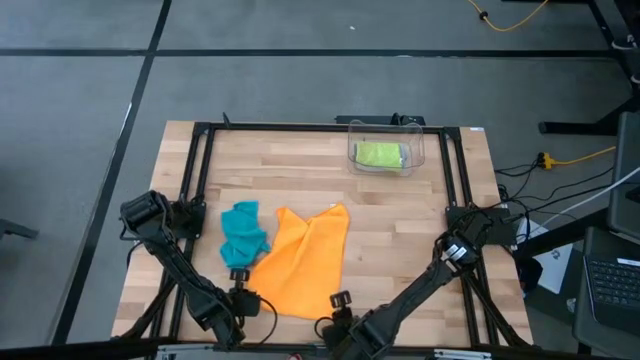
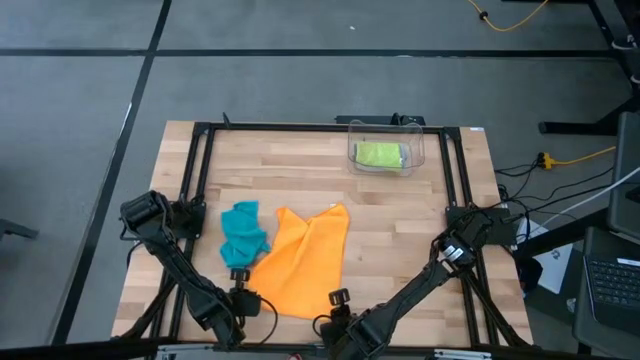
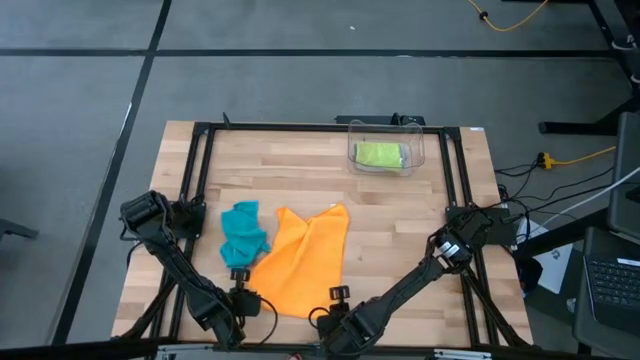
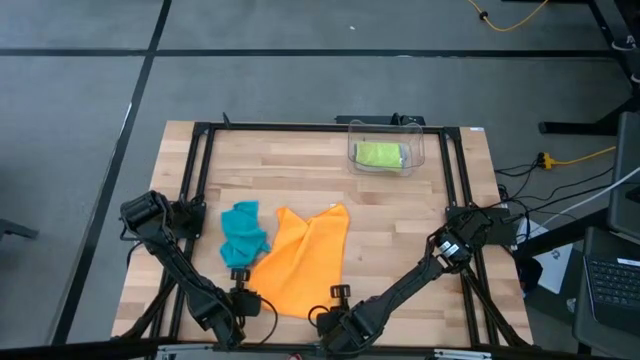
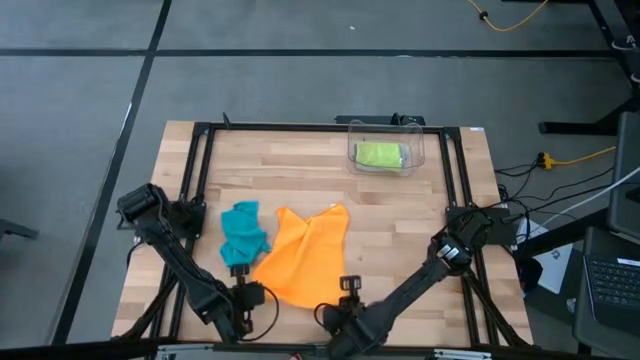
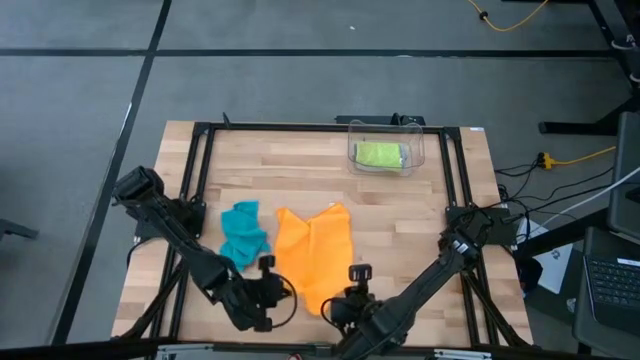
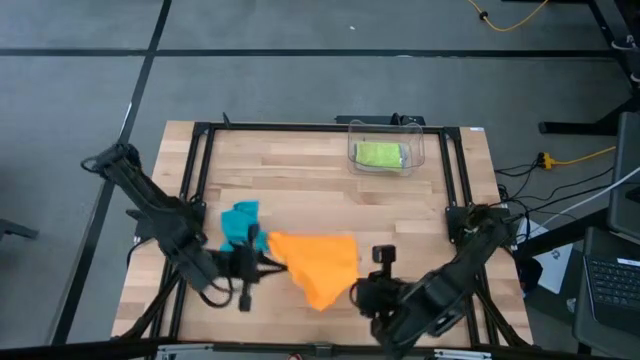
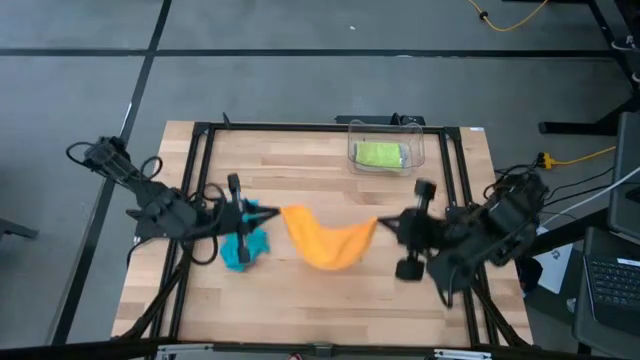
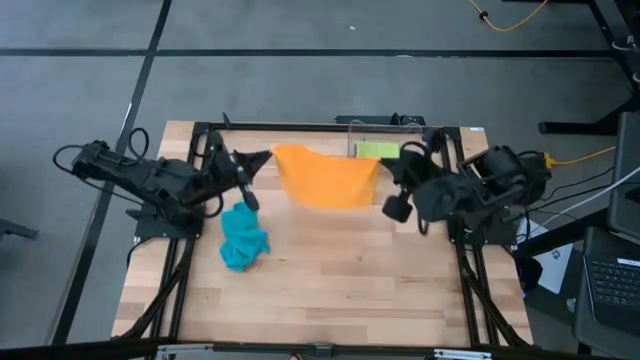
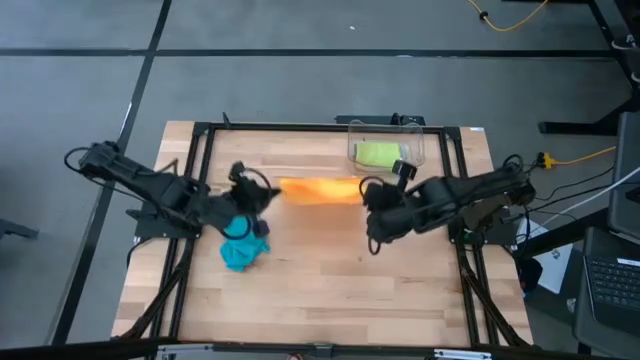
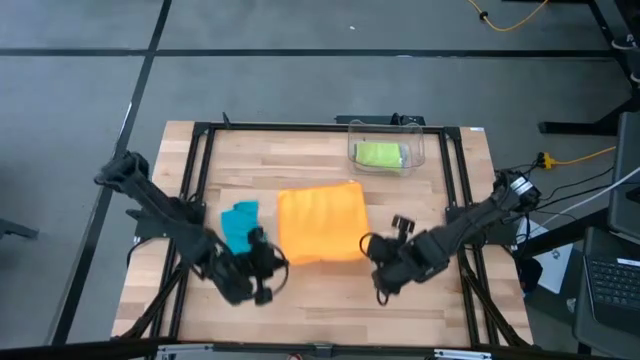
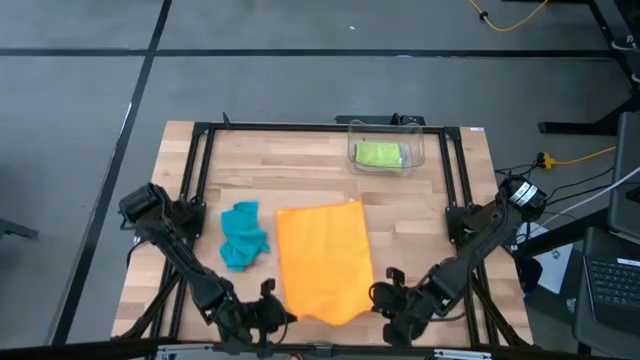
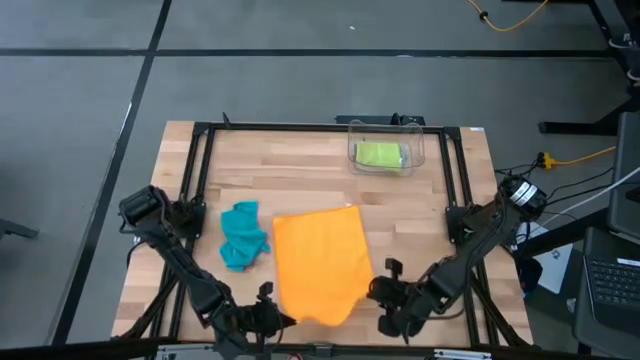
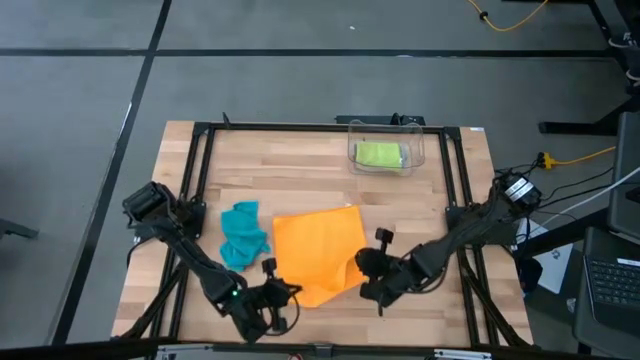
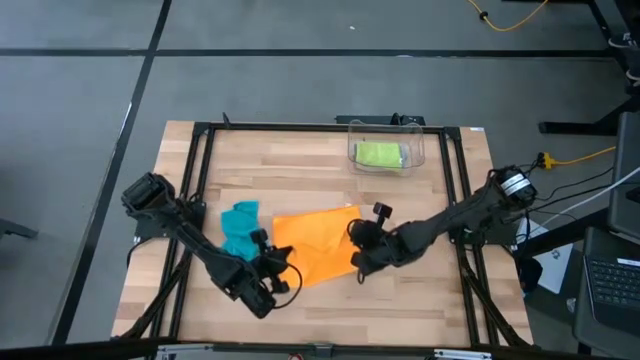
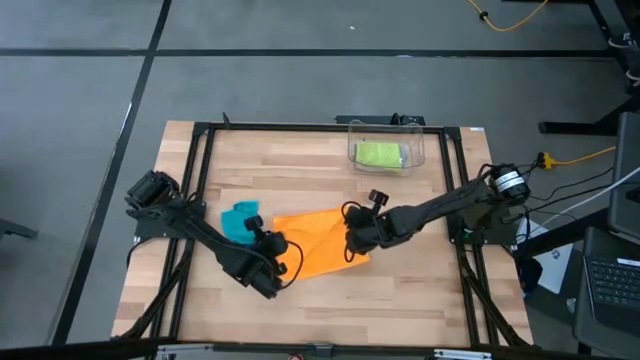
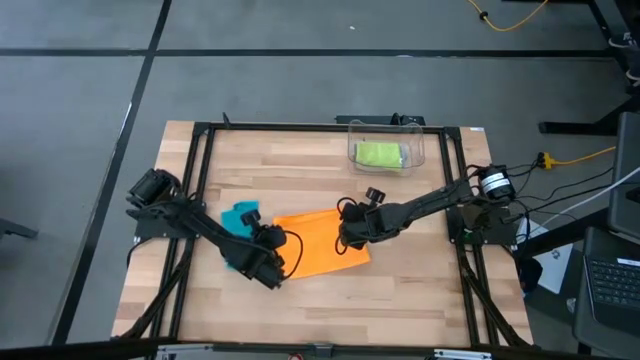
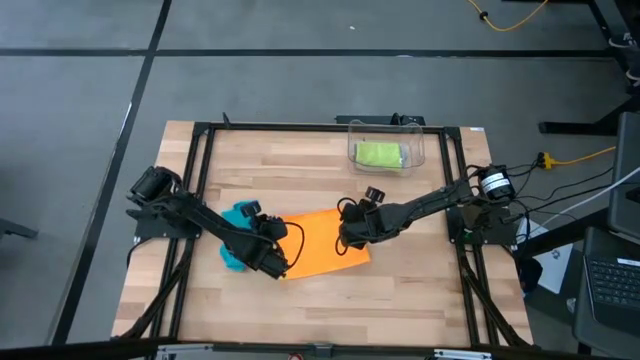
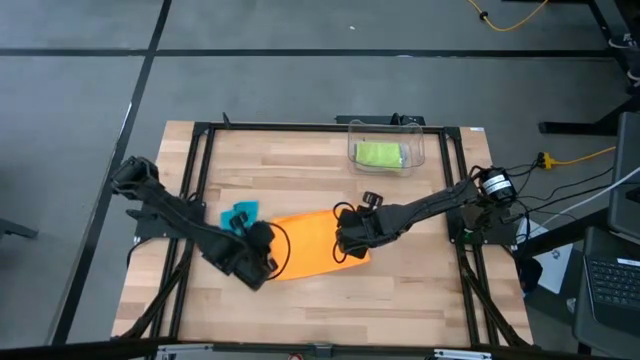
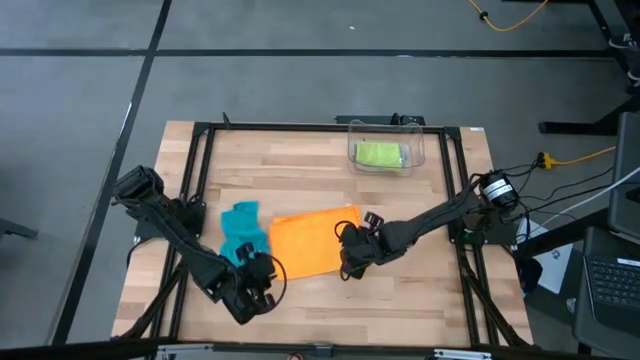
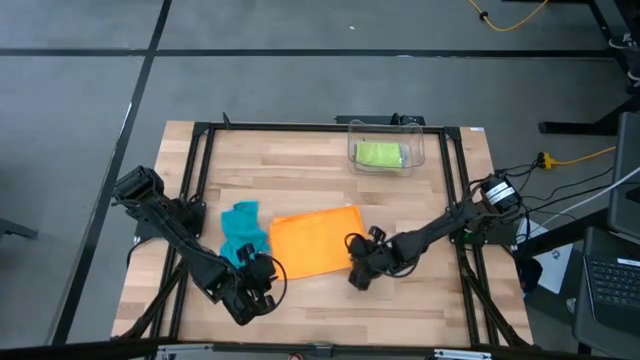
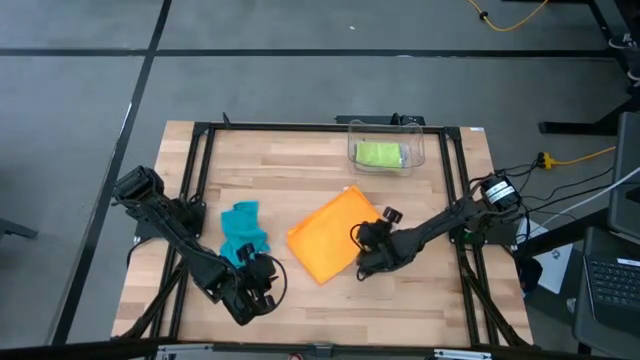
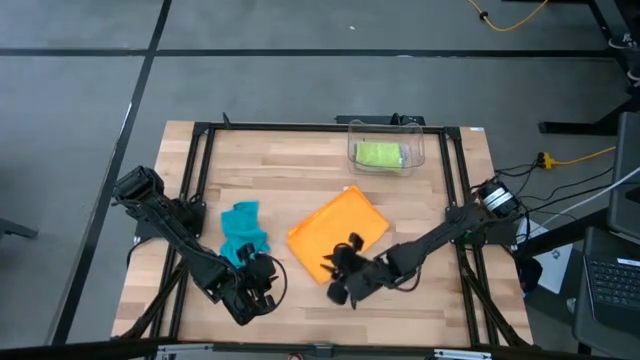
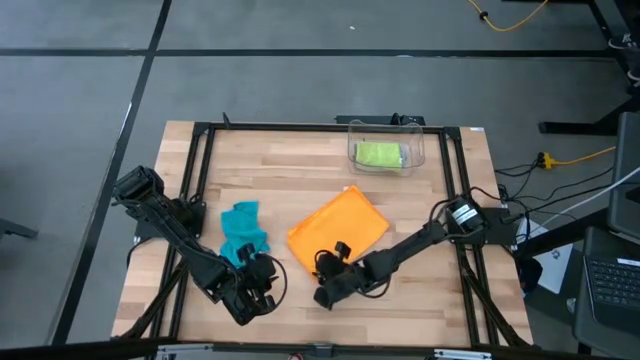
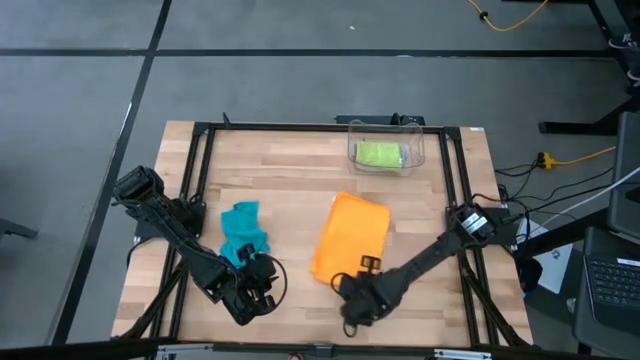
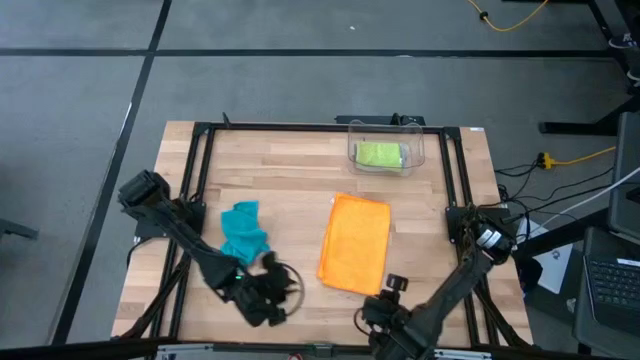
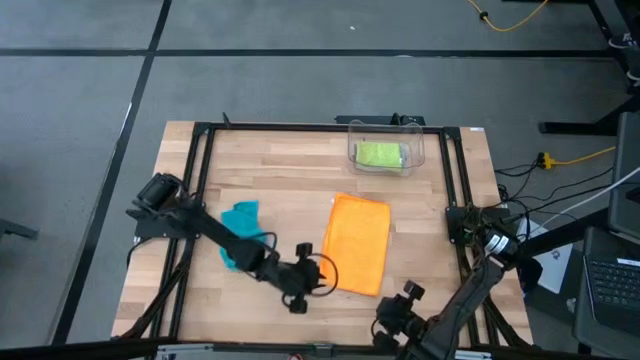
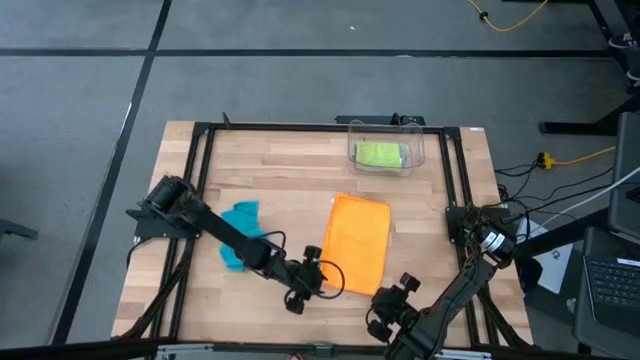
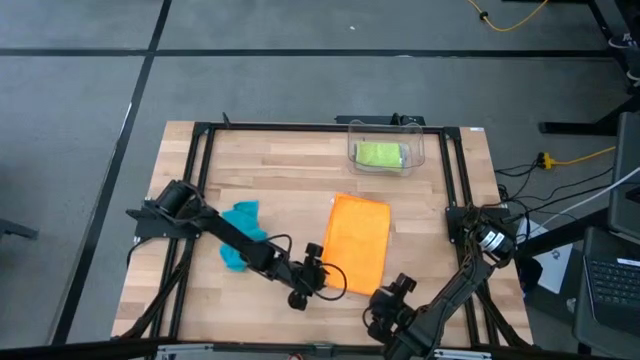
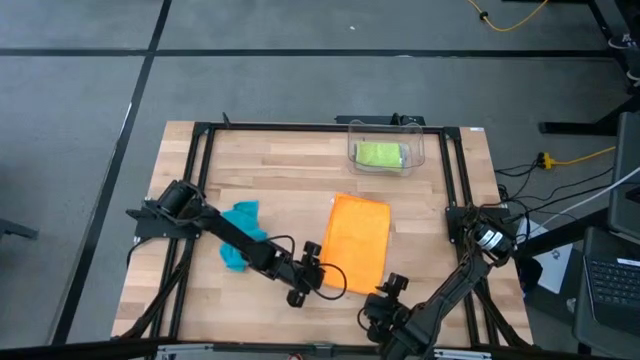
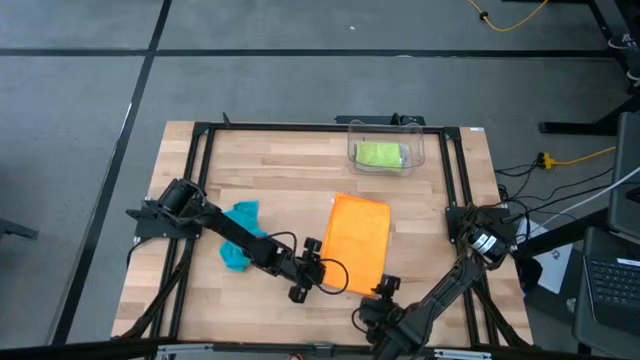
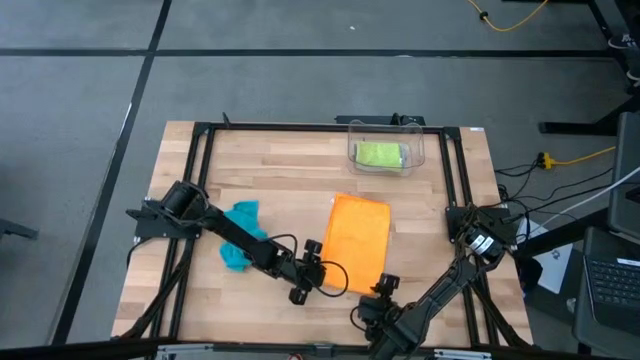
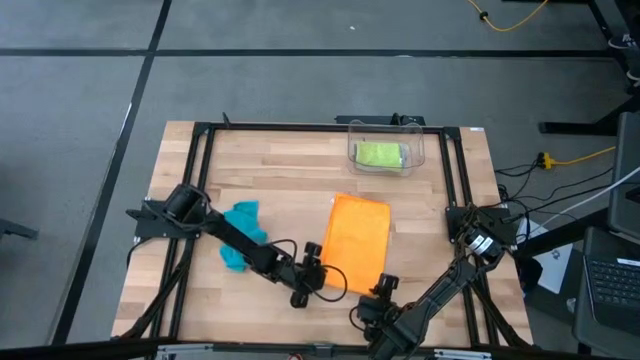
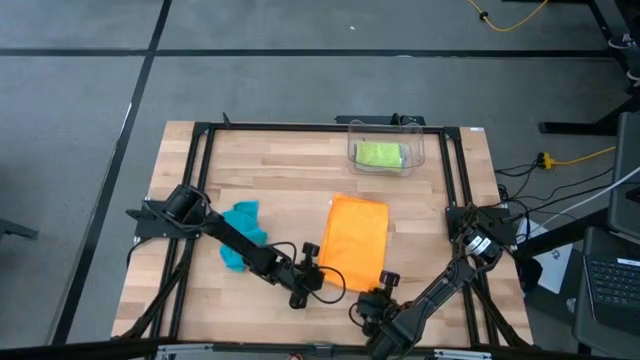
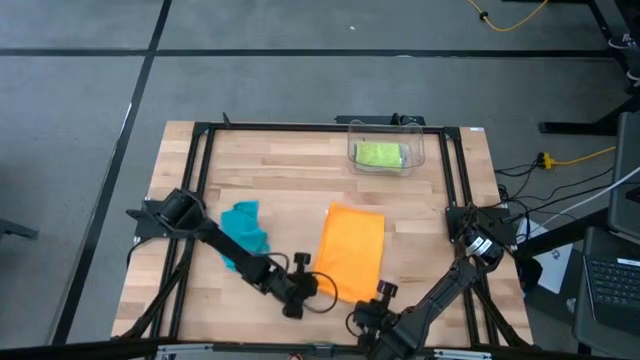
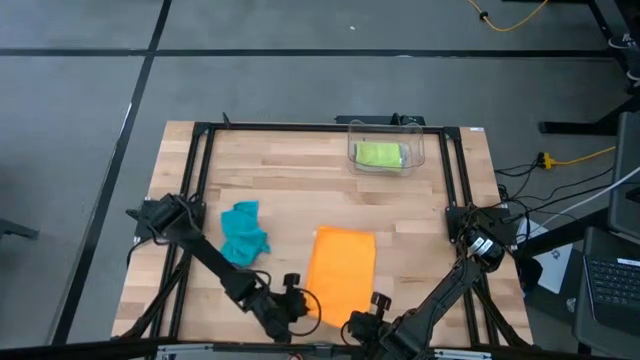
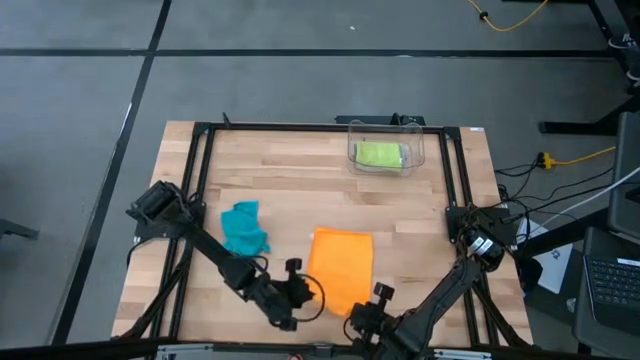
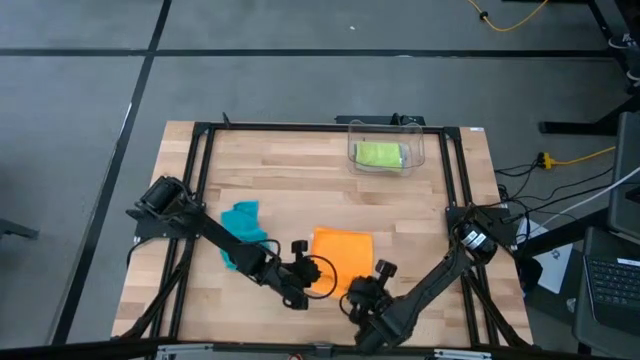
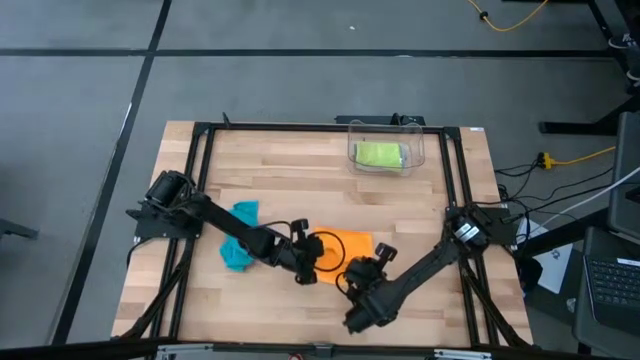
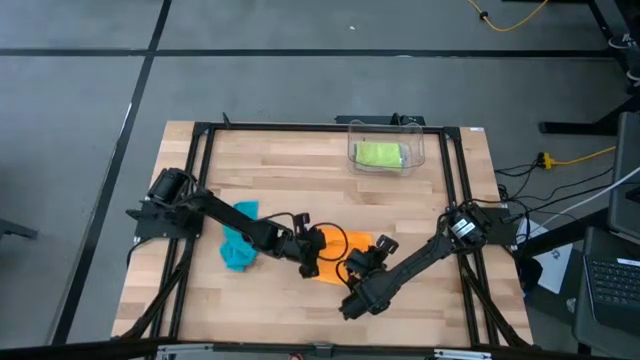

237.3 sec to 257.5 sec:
Task: Fold microfiber towels
Fold the orange microfiber

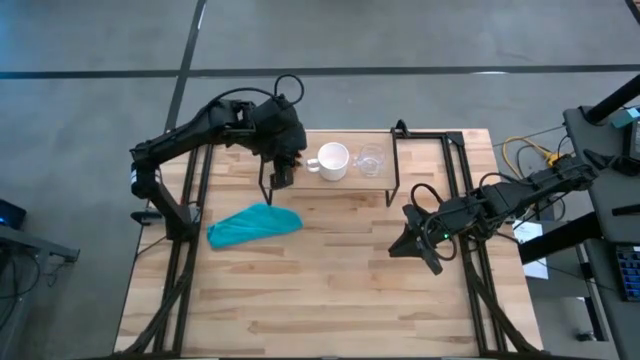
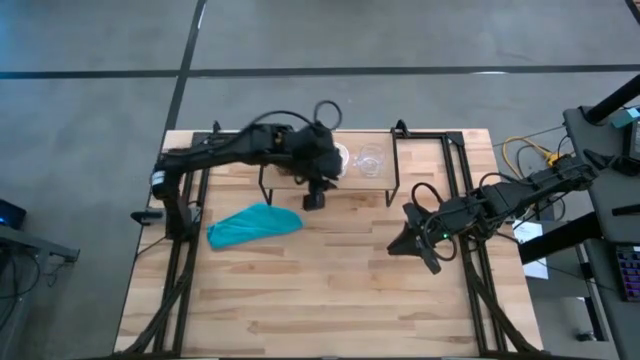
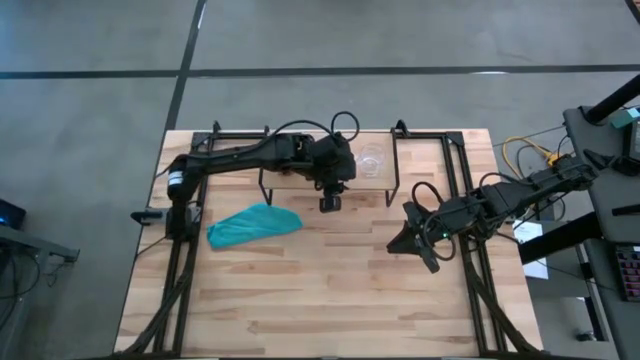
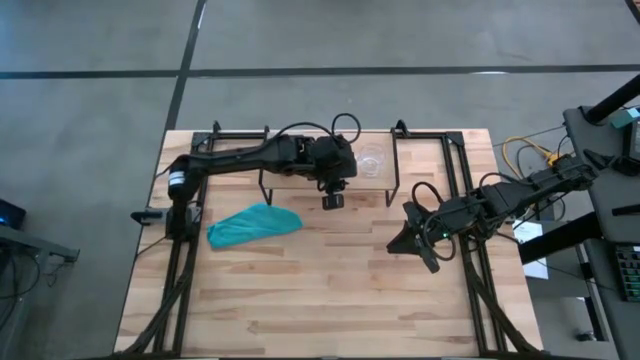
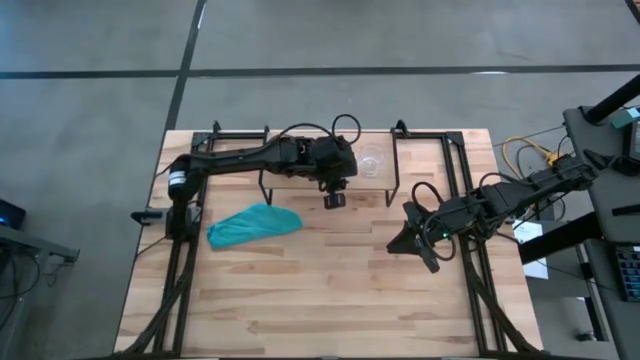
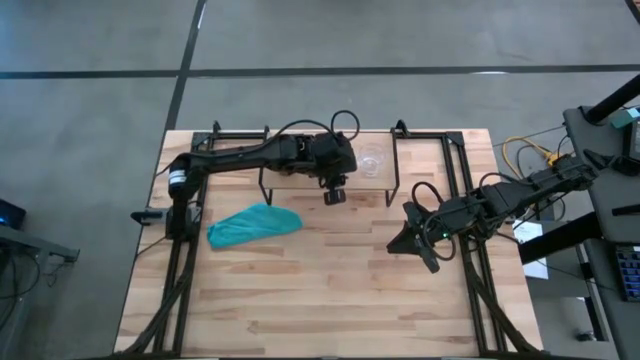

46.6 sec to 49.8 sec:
Task: Stack small to large cups/mugs on shelf
Adjust the white mug on the shelf
